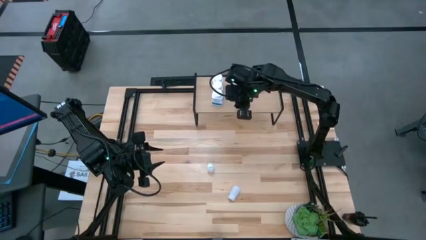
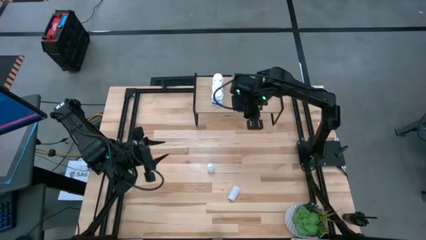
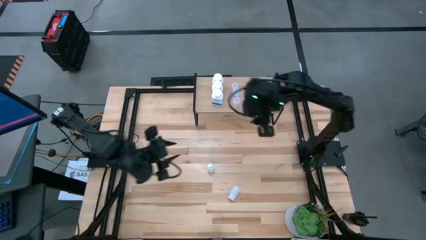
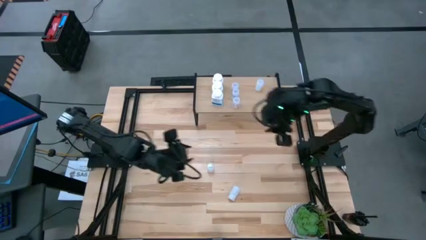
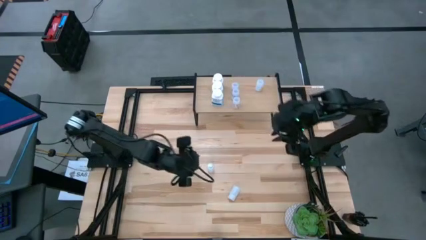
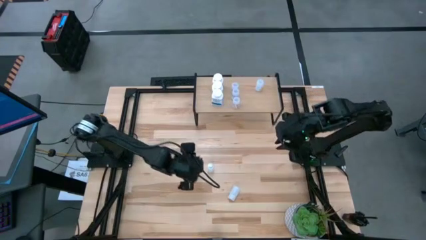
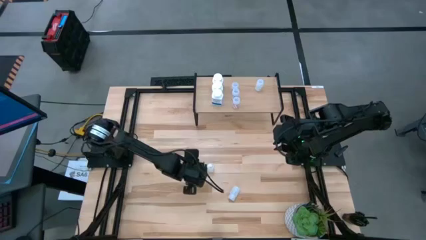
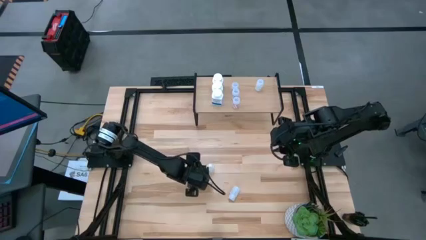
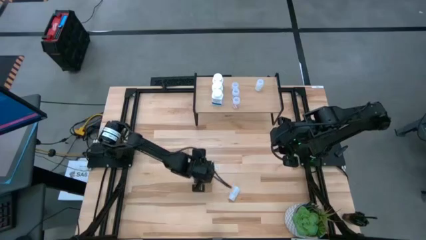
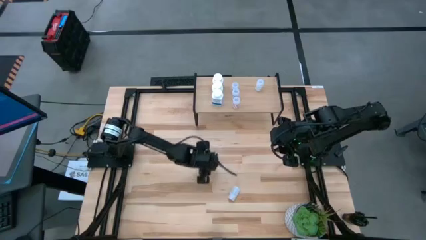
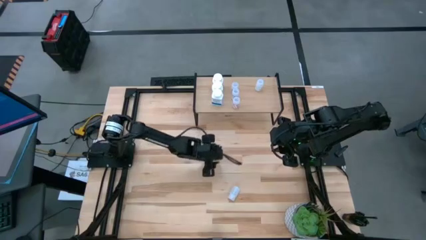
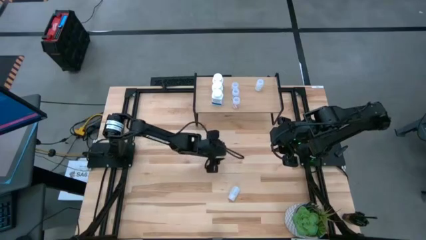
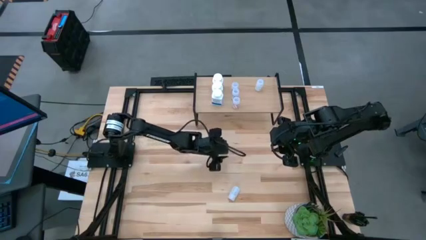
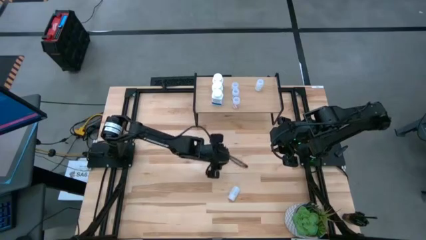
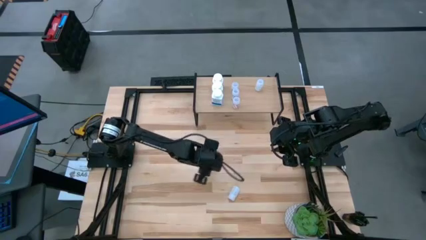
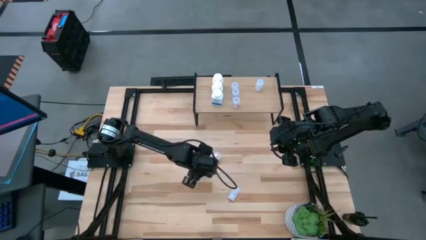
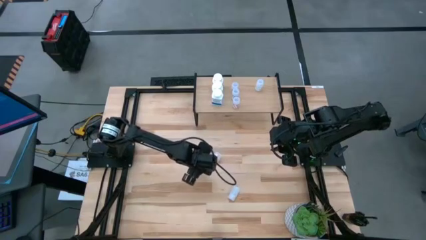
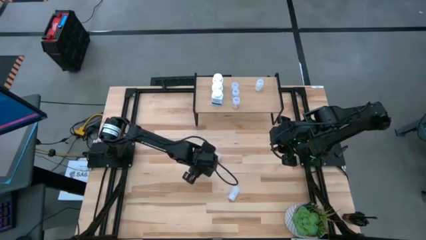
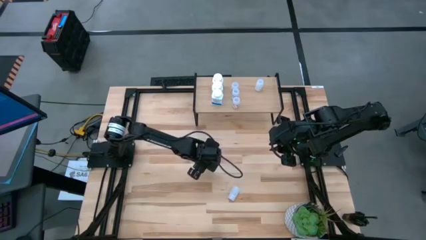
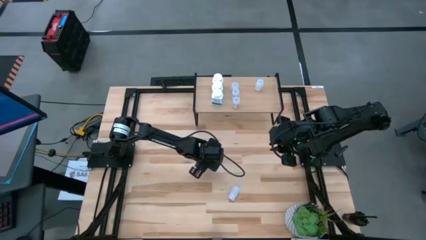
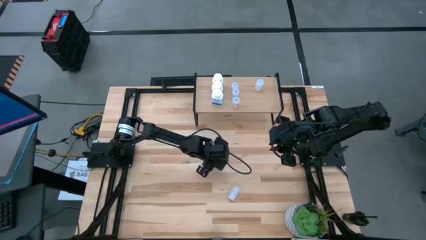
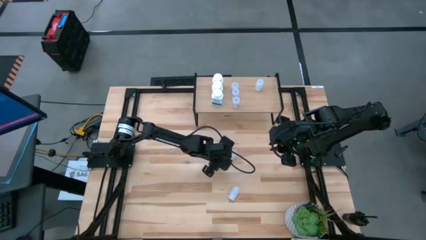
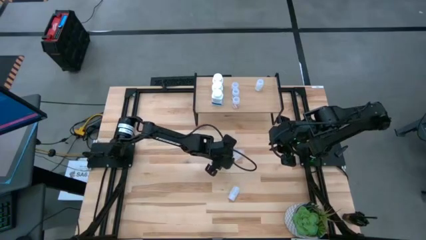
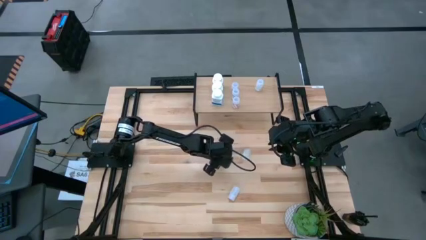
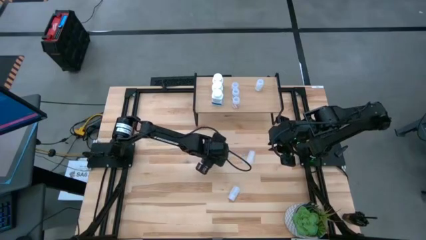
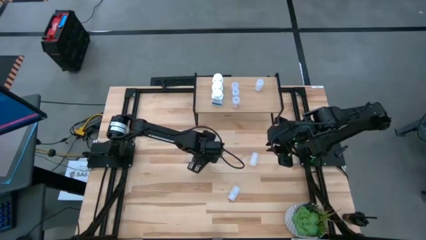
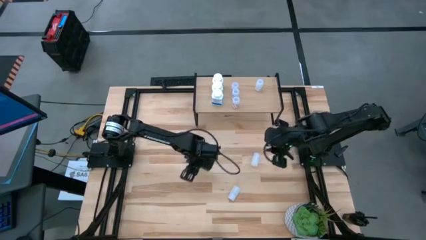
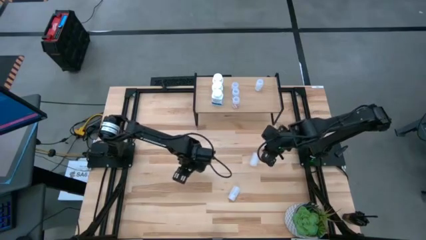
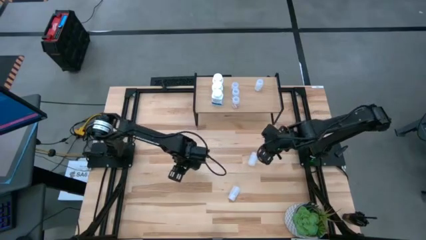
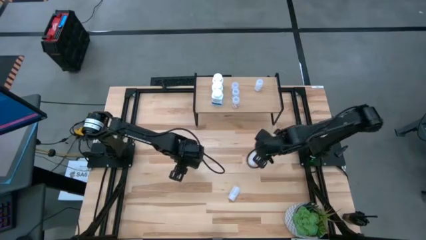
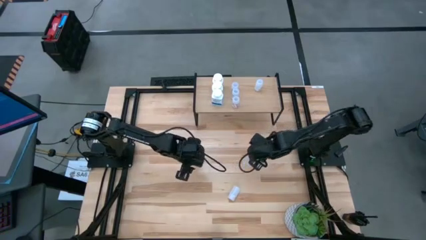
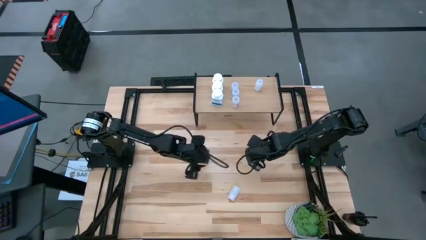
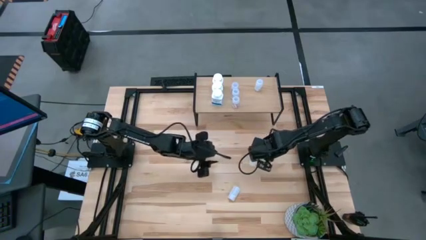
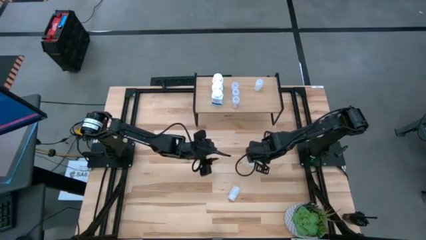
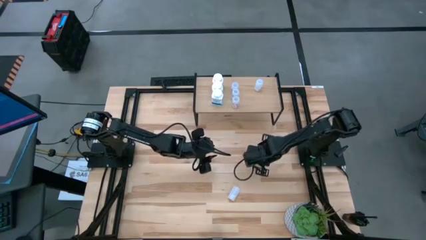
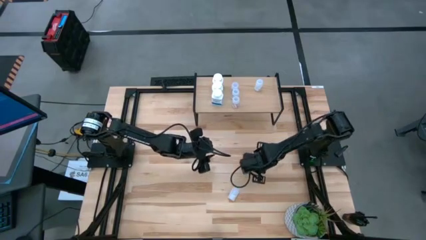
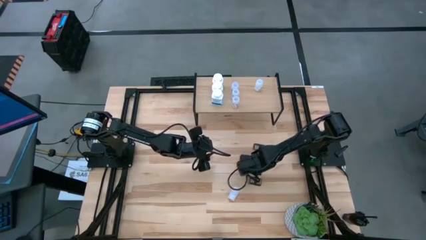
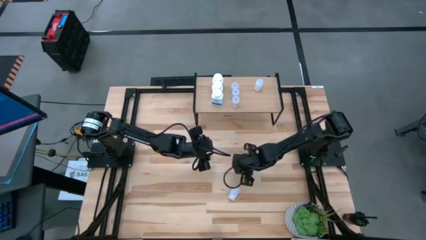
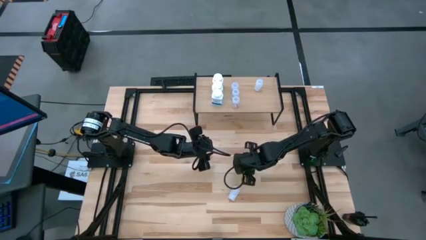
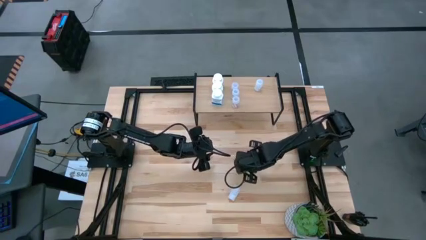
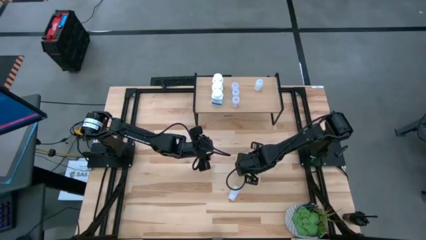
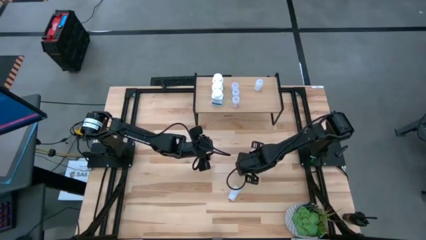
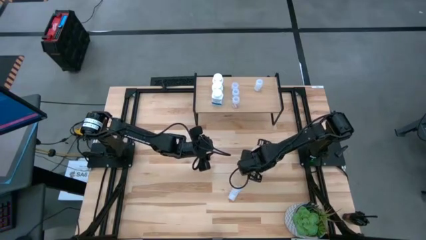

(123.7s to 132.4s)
Task: Pick and place medicine bottles onto shelf by color
Put the top white pill bottle on the shelf aligned with the other white pill bottle

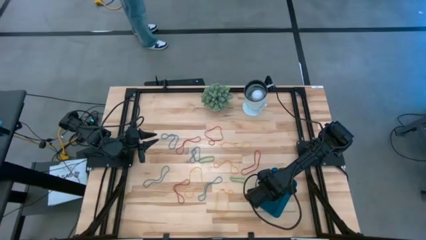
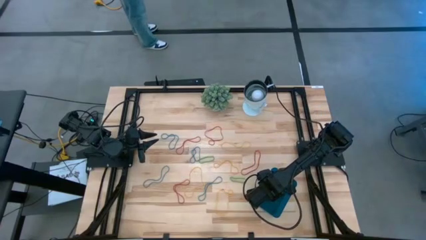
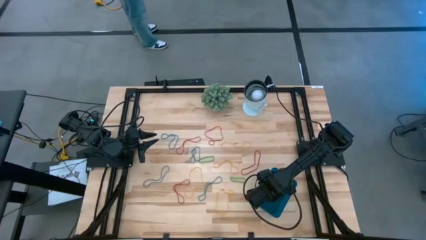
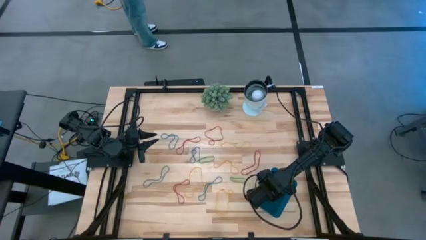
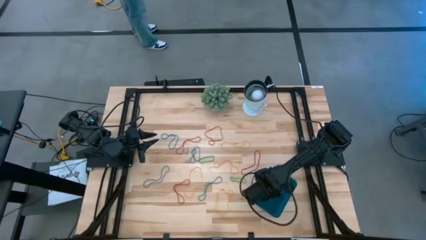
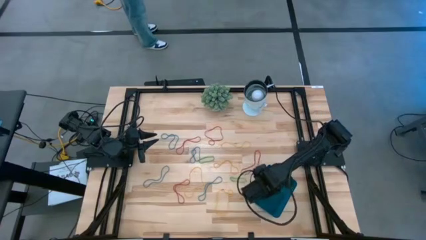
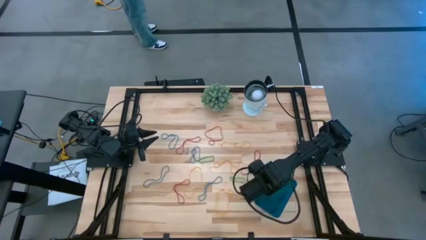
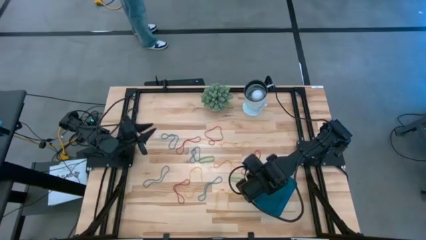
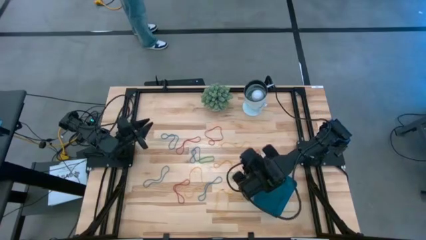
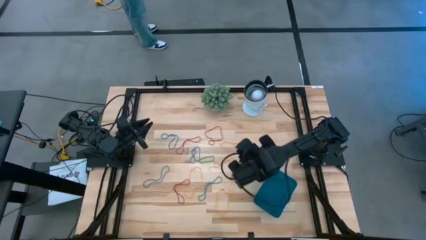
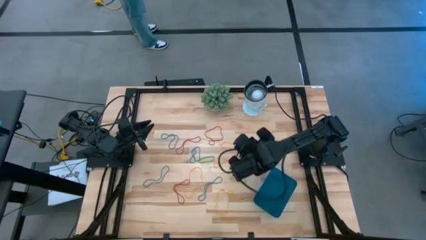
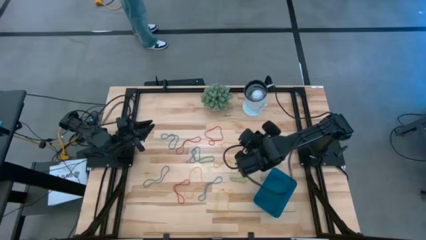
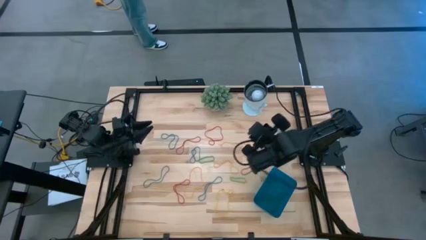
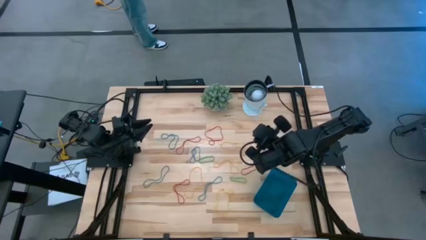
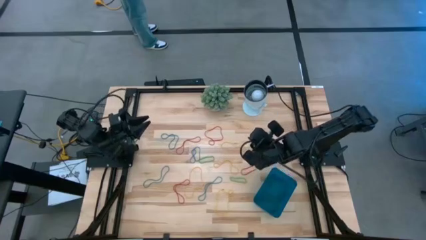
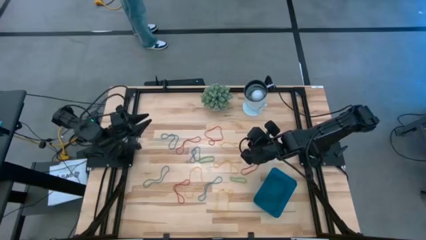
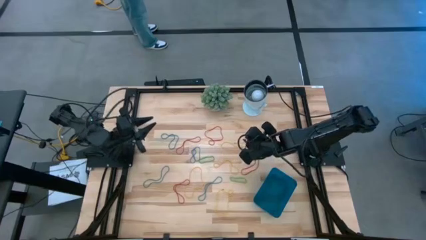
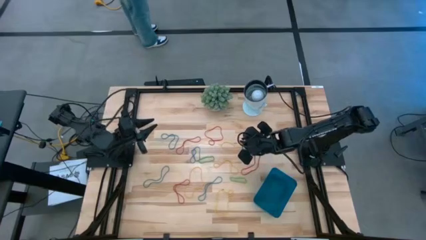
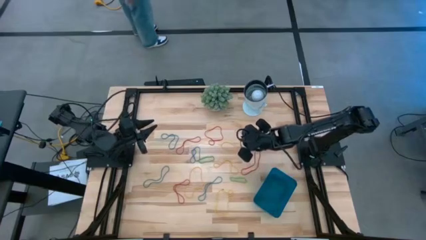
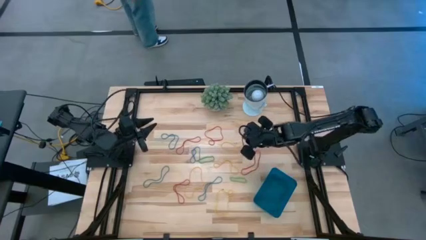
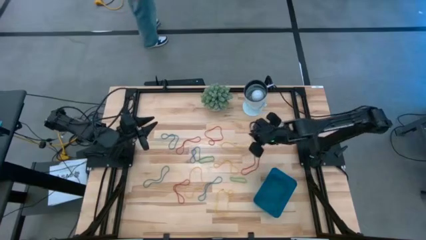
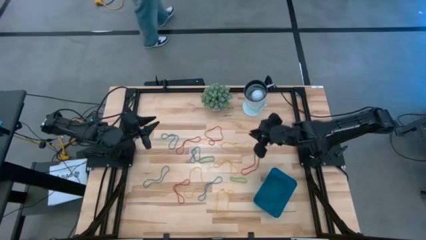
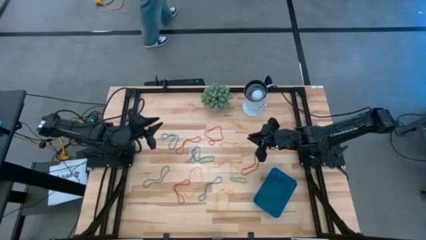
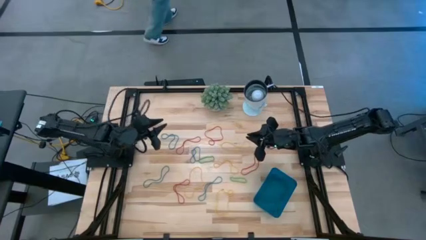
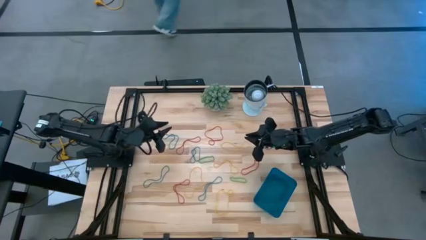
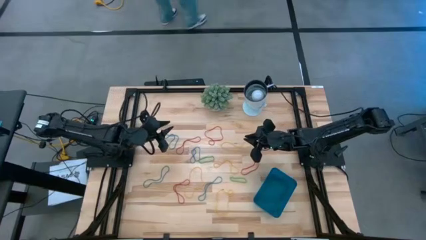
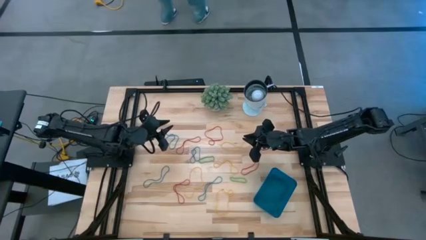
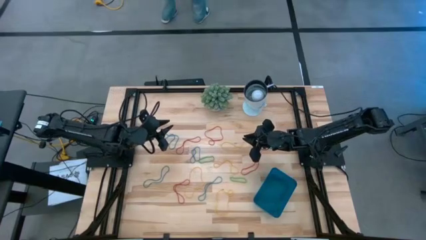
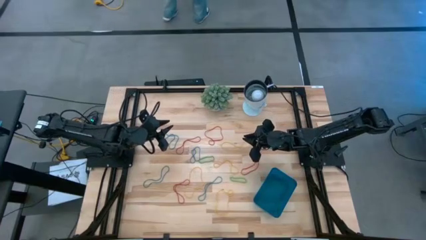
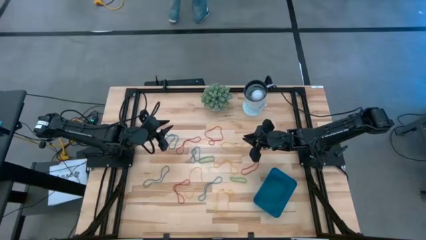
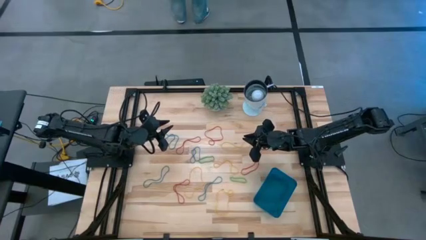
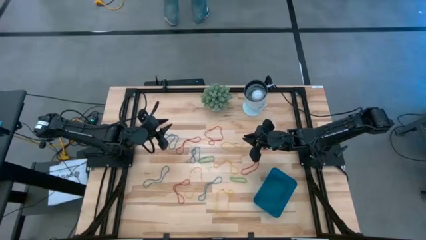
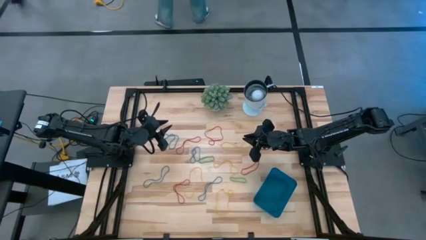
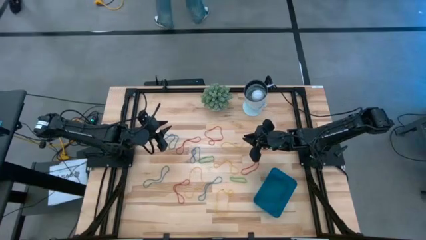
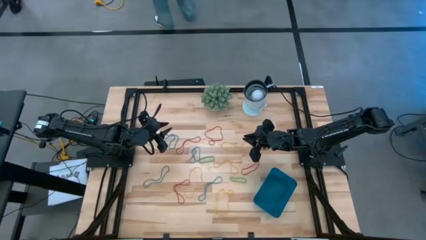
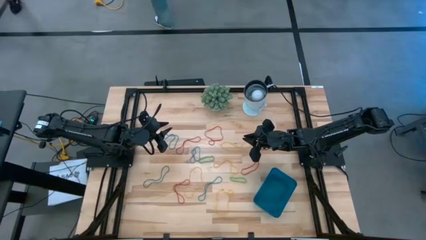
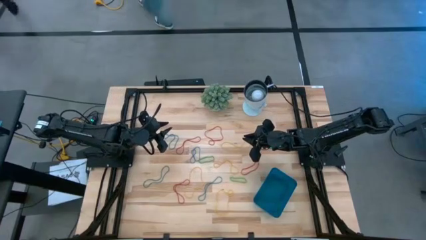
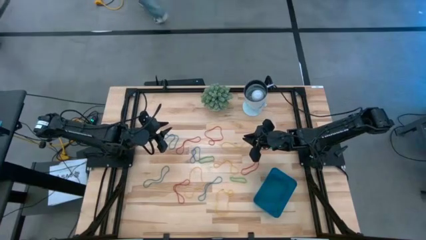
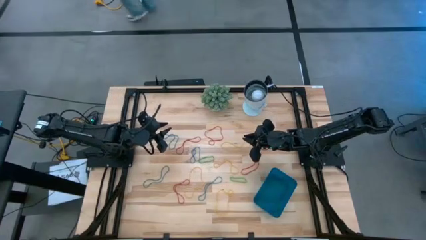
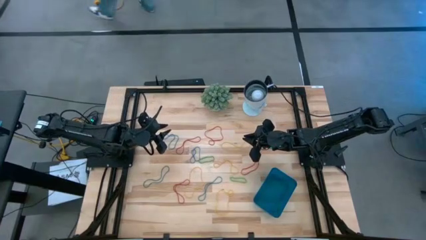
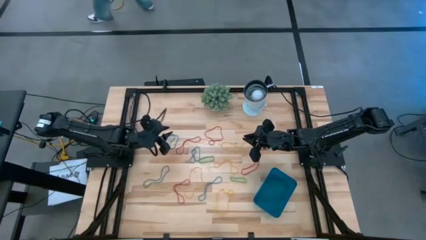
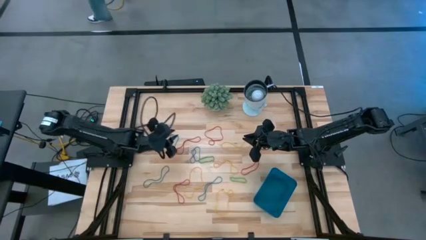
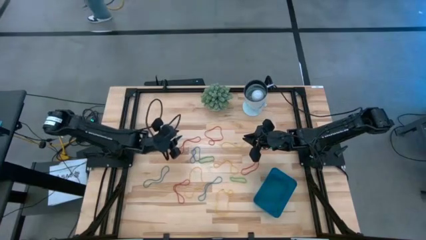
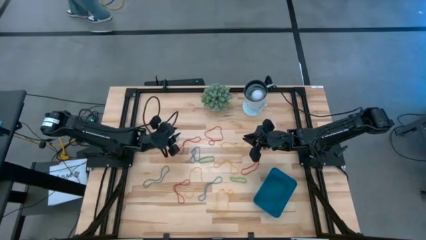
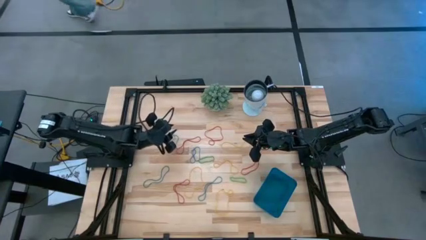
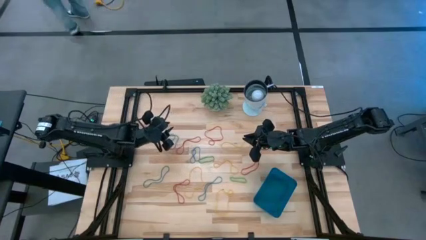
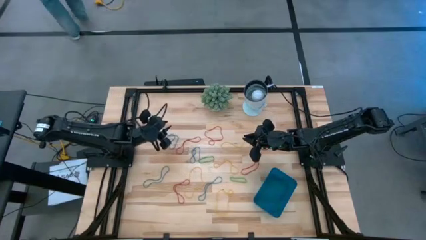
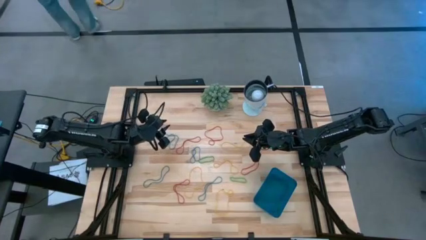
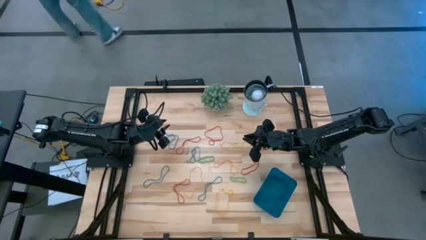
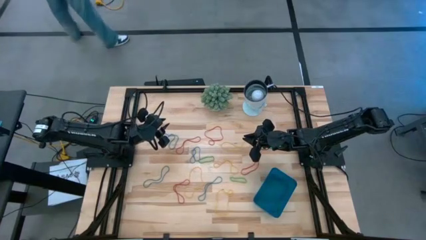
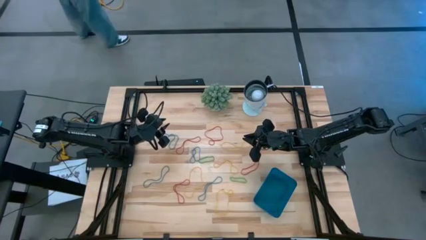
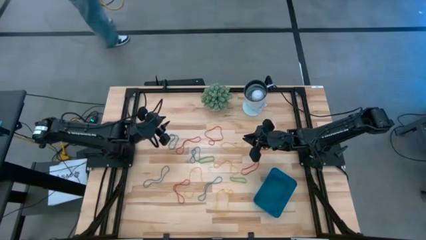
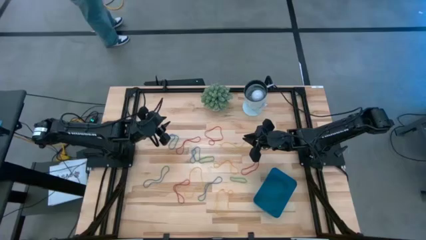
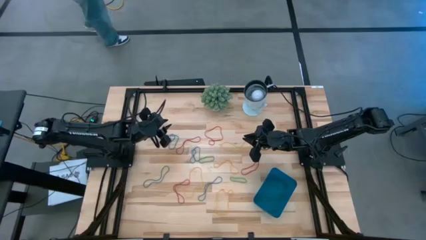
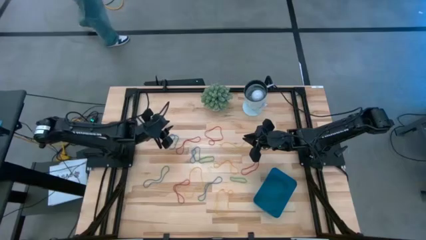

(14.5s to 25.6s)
Task: Pick and place items into bin
Put the blue rubber band into the blue bin
